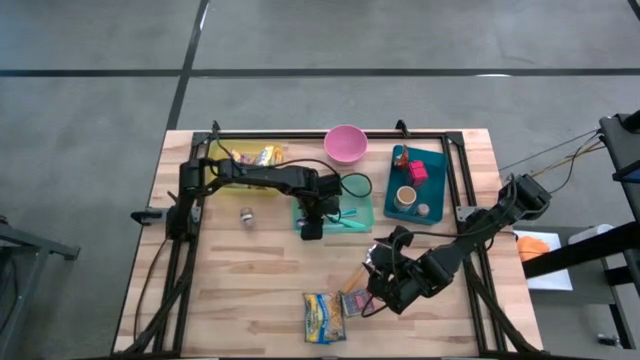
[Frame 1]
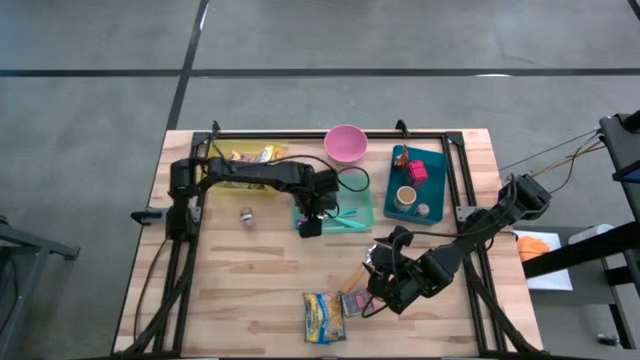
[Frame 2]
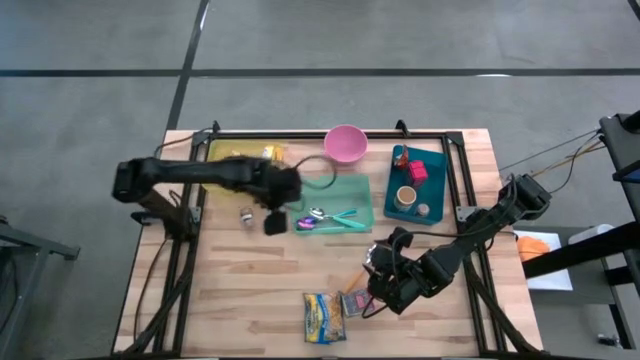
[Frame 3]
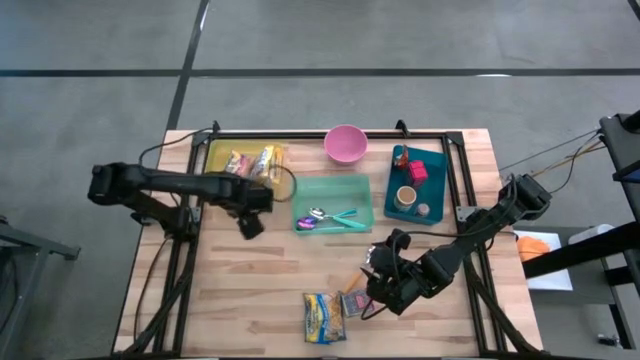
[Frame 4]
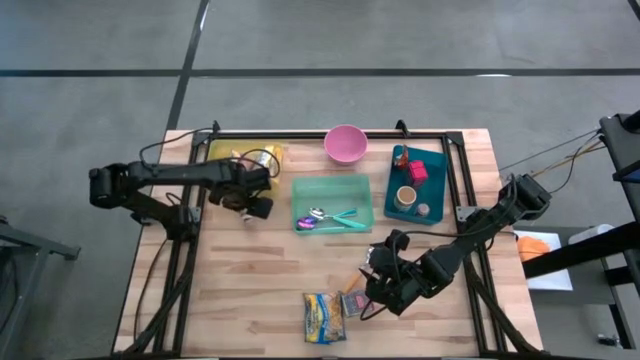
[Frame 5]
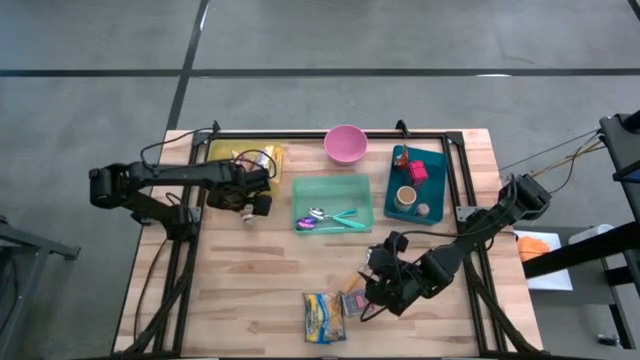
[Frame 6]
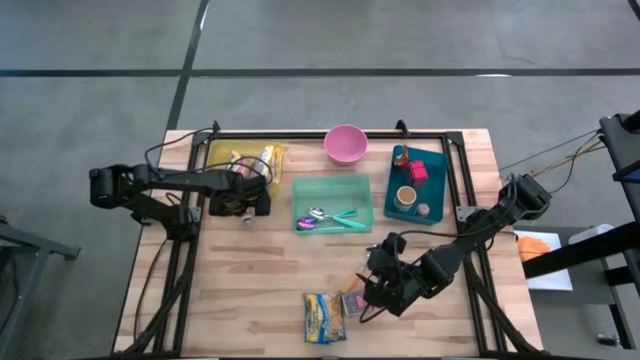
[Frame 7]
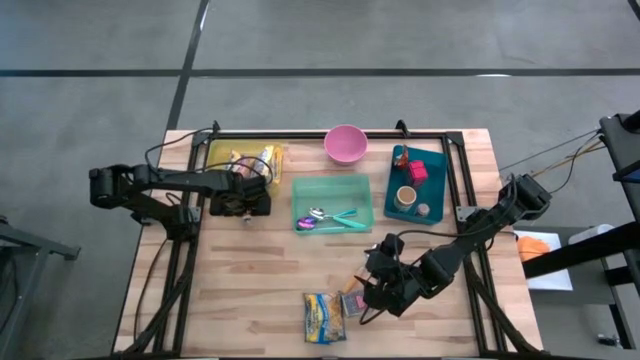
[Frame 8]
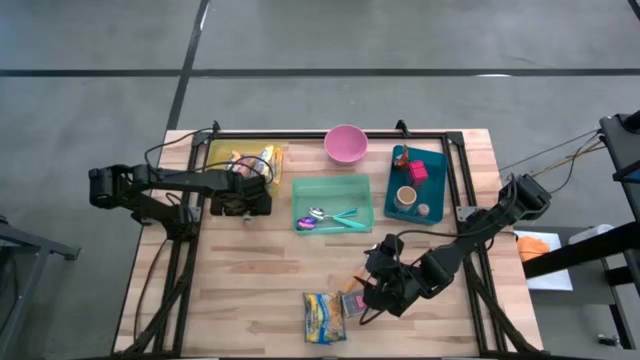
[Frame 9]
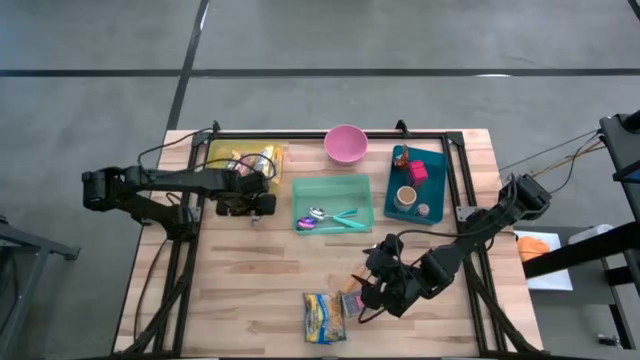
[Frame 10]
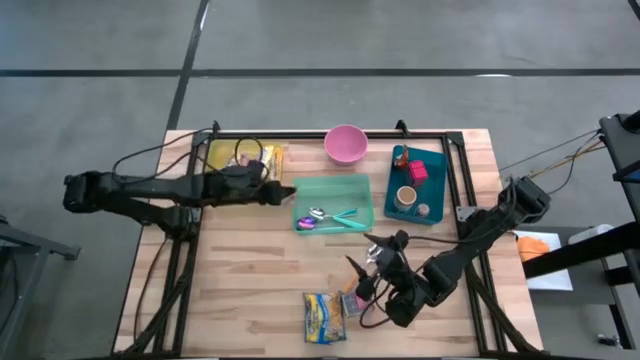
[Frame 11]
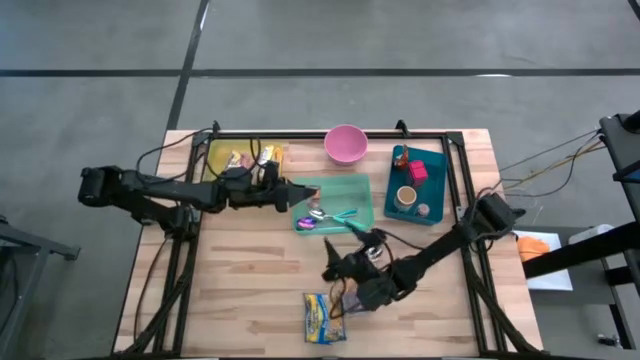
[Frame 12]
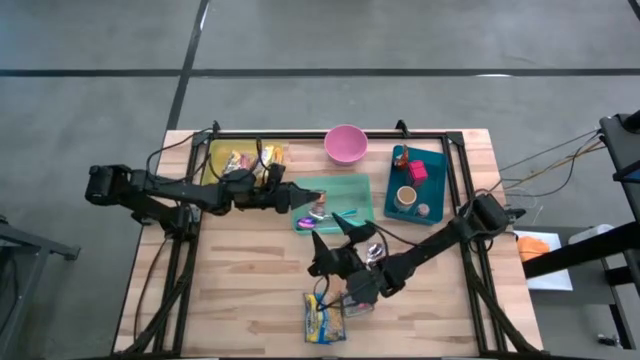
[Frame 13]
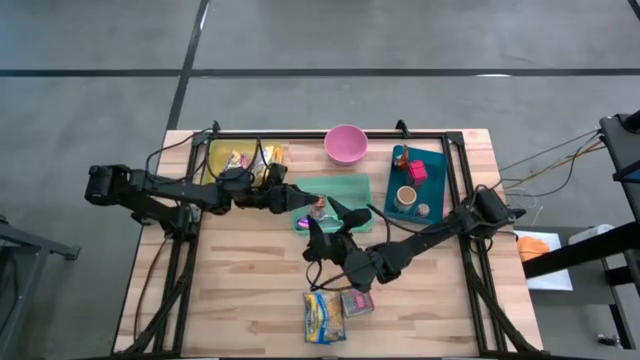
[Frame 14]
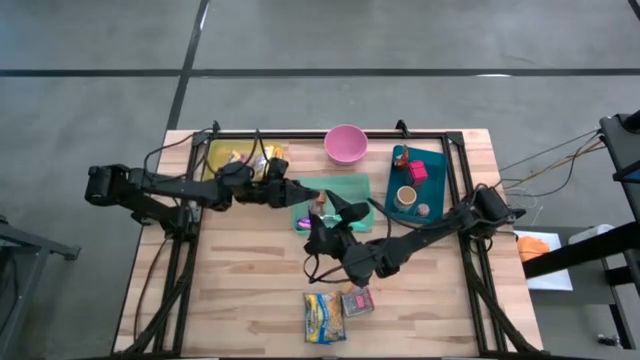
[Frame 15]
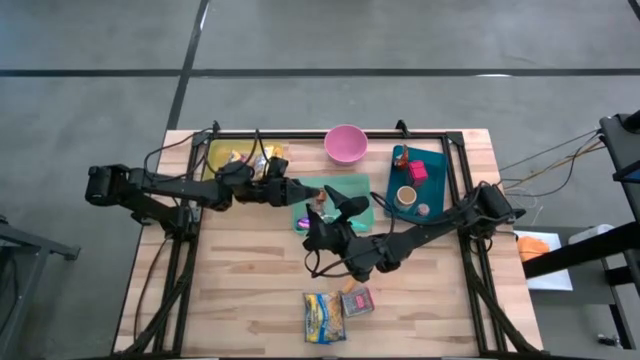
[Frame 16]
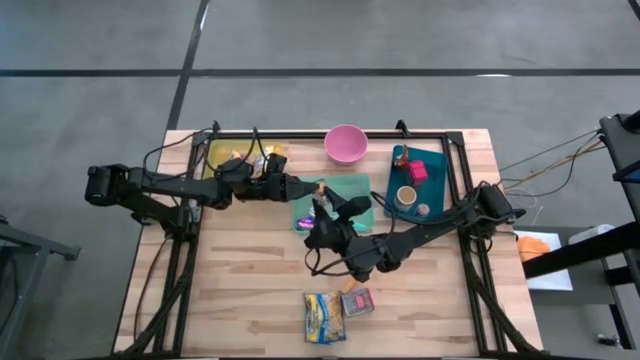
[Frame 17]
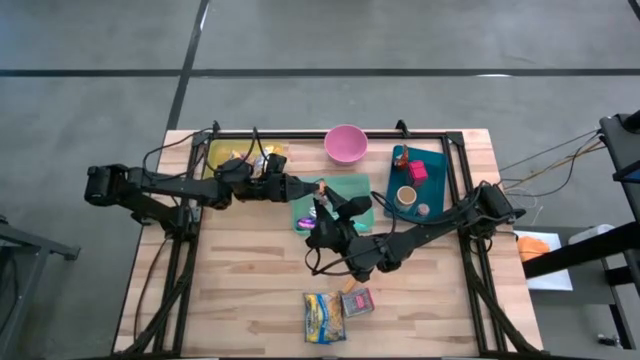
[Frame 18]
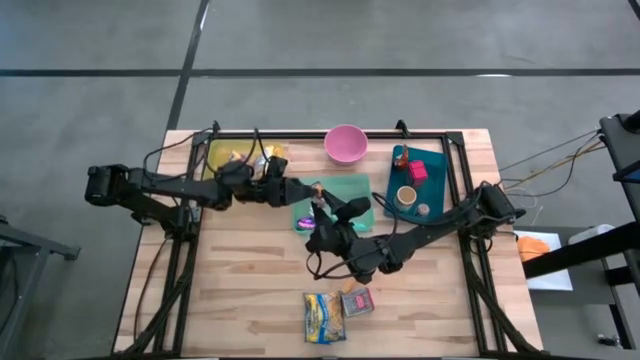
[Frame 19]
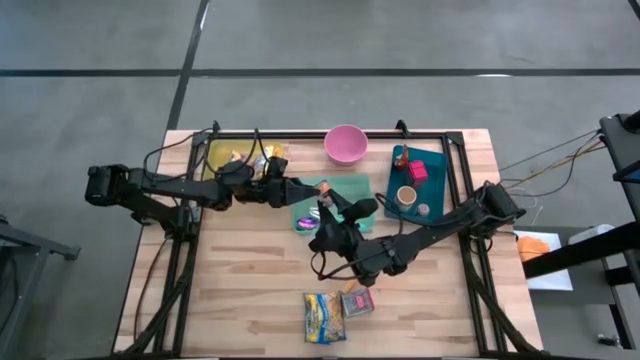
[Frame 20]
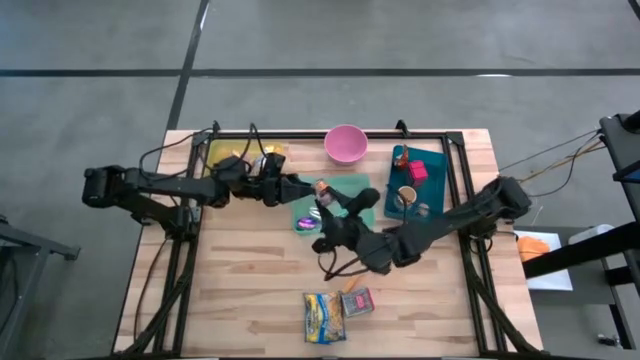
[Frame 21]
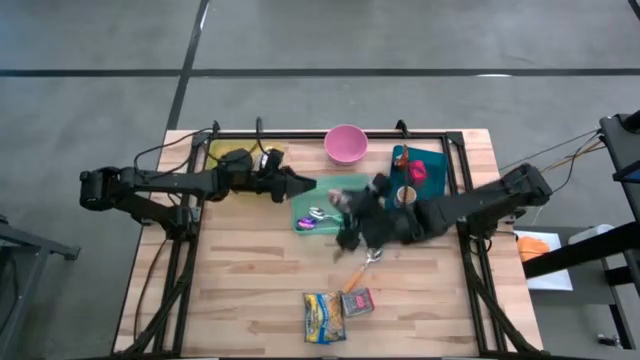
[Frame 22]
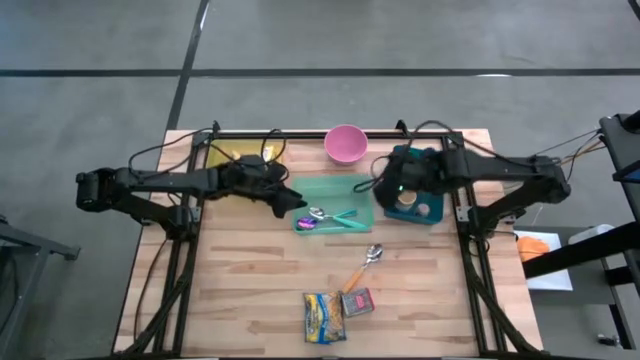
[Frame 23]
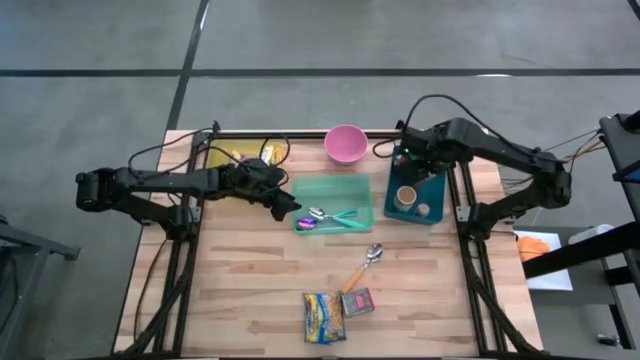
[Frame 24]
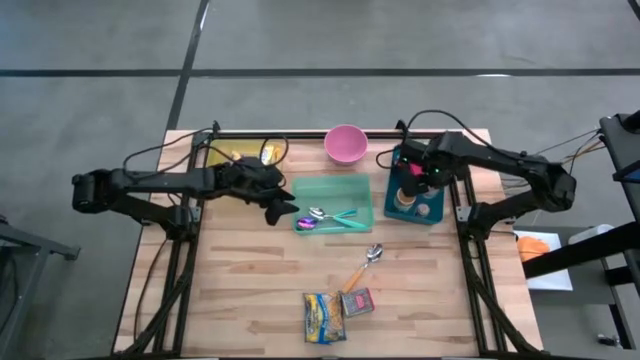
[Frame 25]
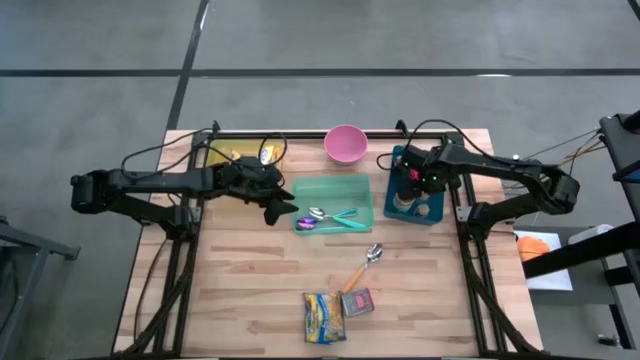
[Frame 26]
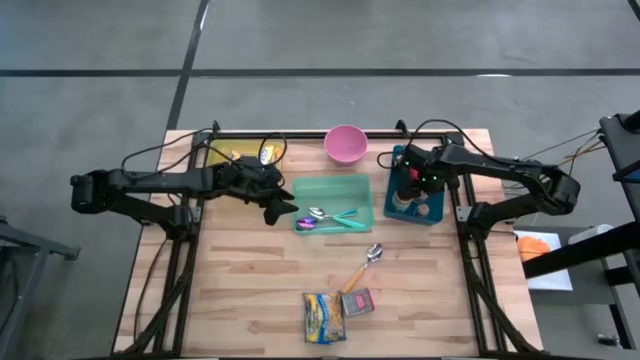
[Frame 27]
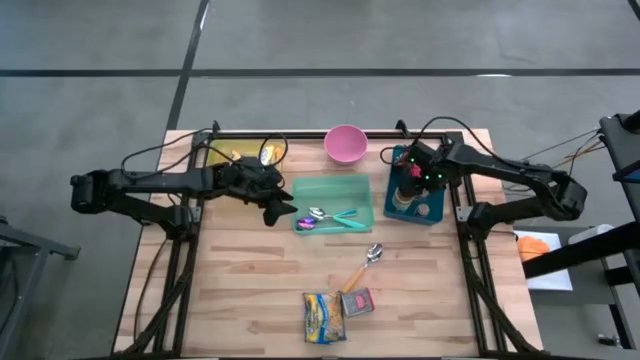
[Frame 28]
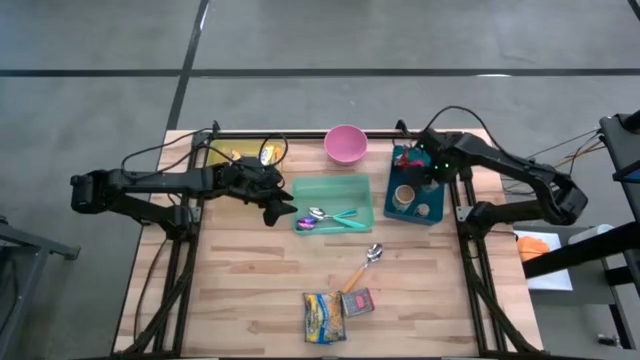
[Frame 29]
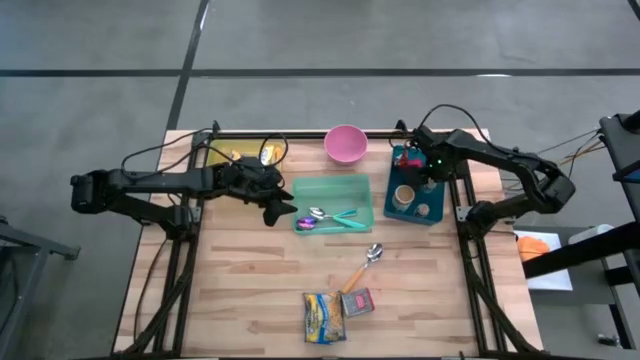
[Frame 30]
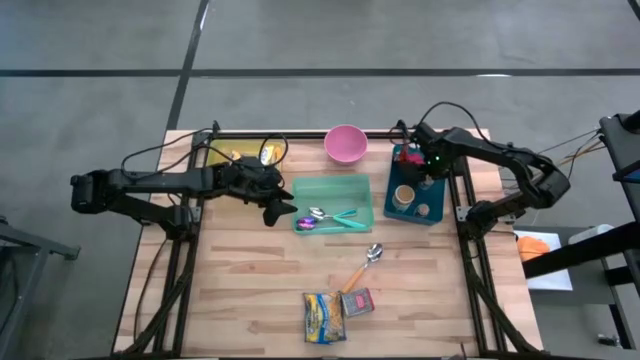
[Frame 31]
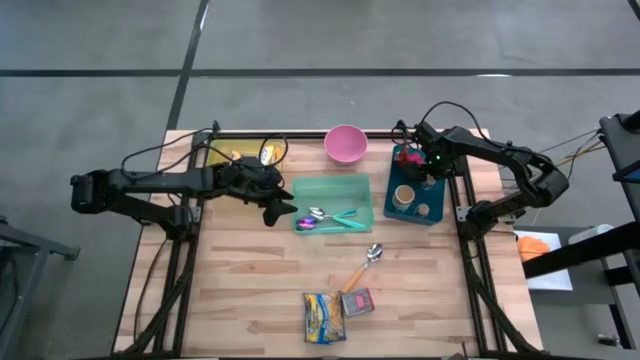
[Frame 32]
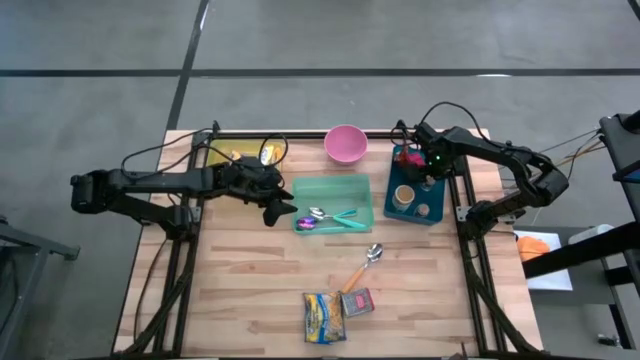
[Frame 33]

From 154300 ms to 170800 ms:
Put the brown seasoning bottle into the blue bin
